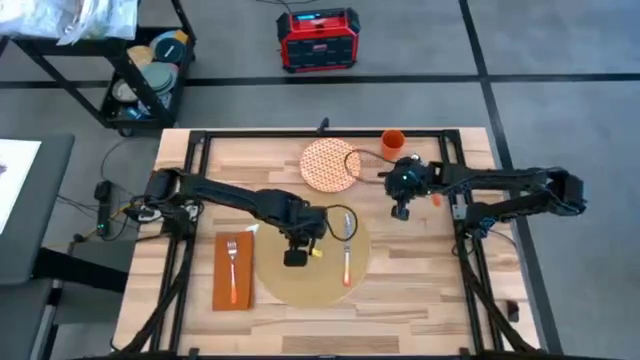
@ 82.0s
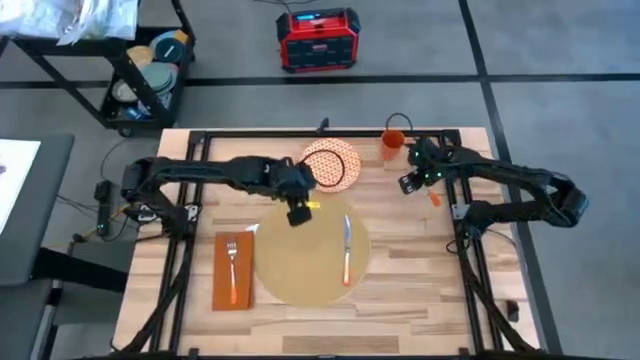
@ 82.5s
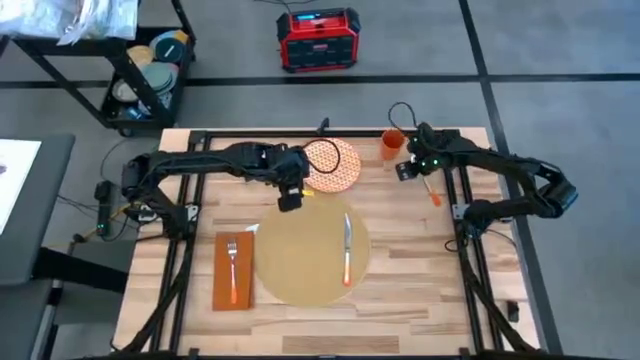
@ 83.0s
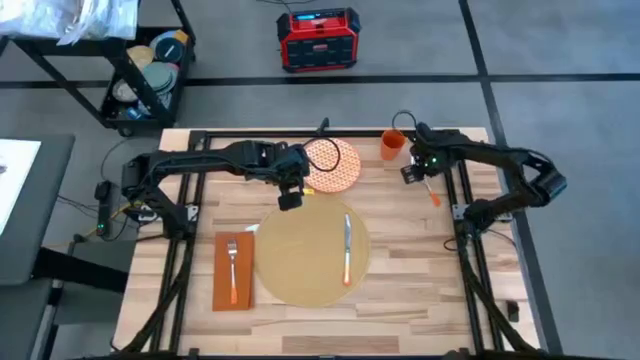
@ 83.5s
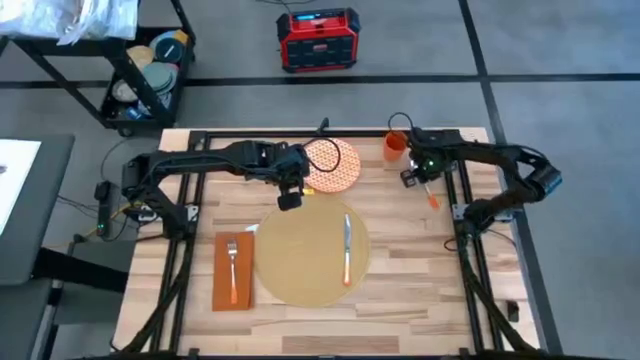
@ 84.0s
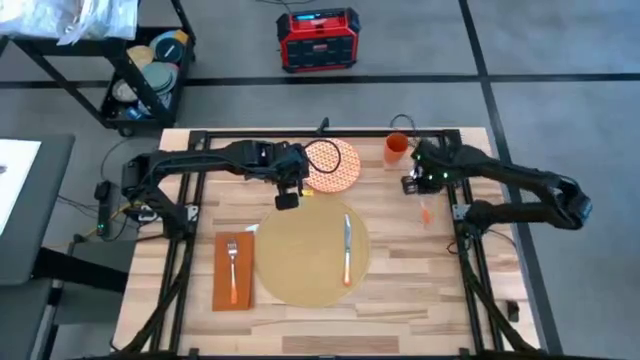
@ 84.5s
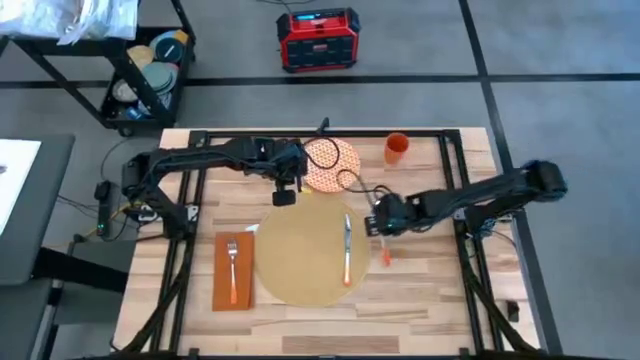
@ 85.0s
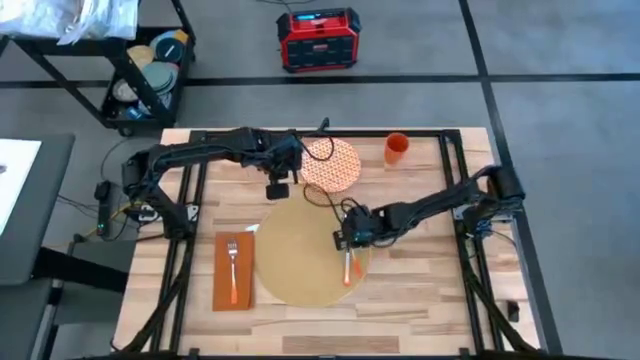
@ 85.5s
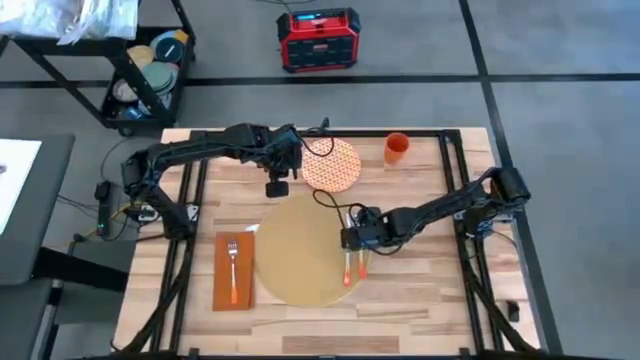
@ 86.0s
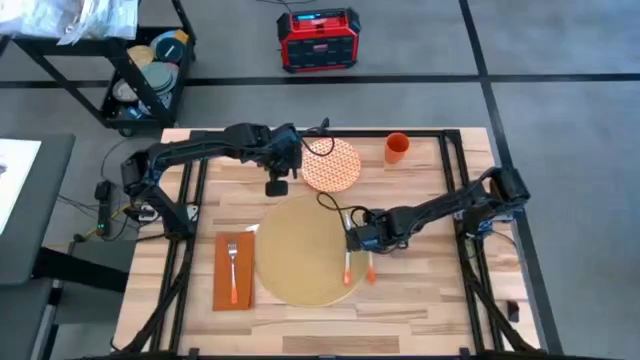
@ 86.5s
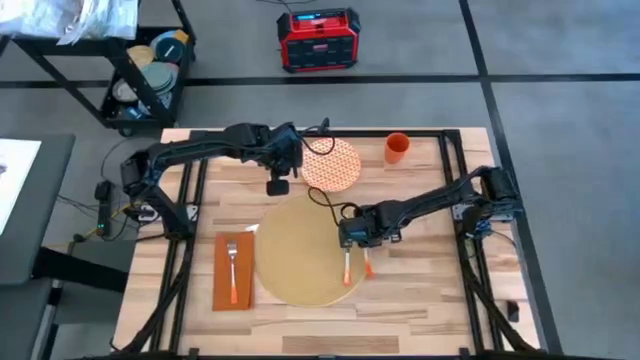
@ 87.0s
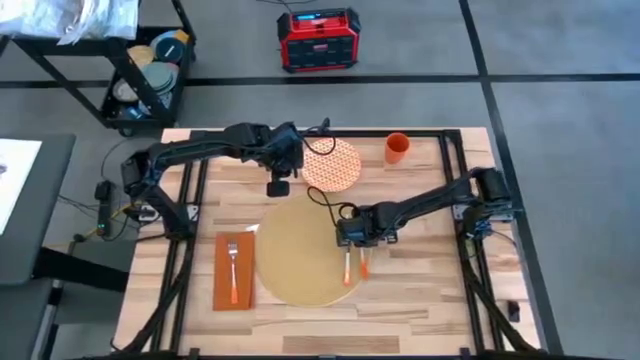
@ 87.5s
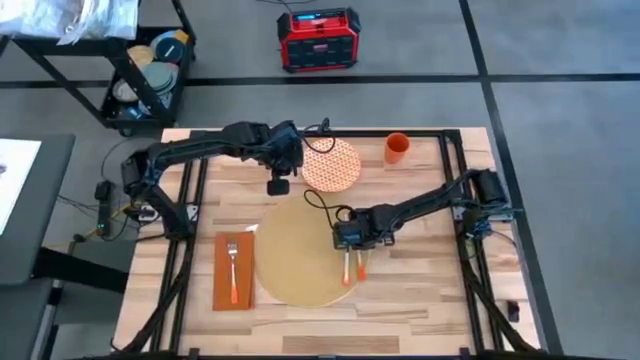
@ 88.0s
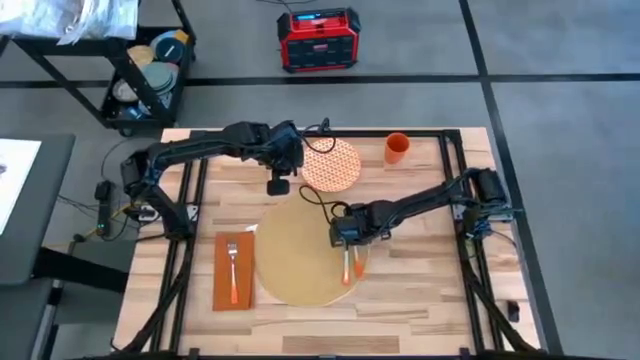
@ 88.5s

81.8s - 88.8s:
Task: Set table place
Put the orange table spoon on top of the brown placemat to the right of the orange table knife

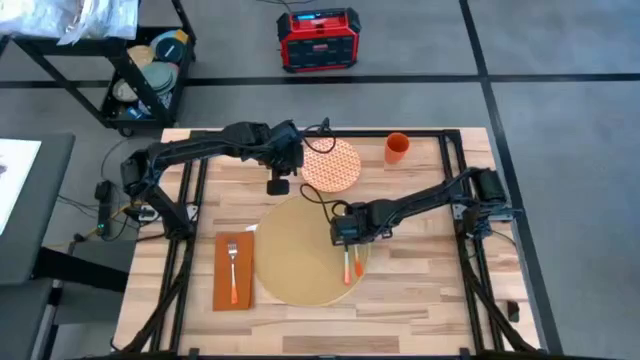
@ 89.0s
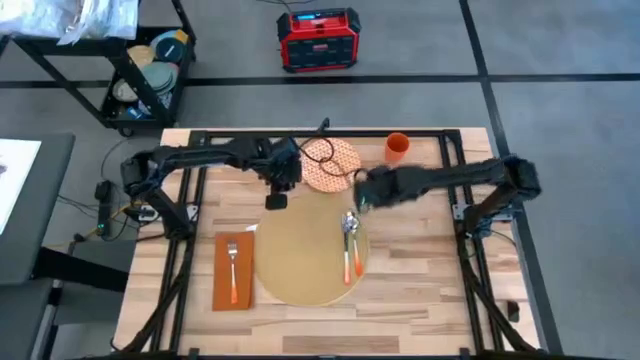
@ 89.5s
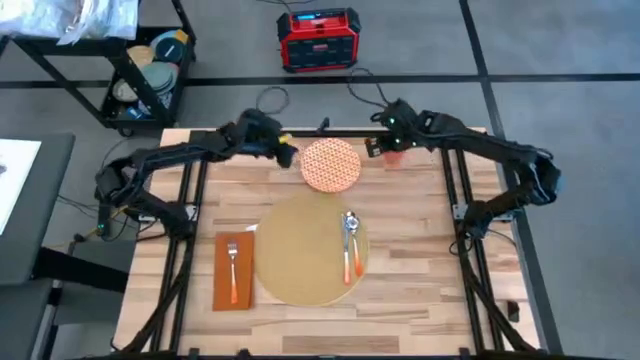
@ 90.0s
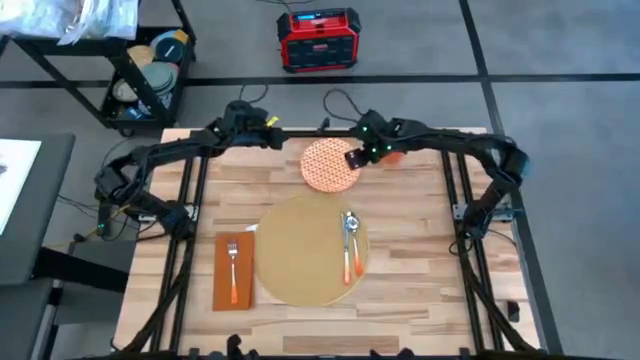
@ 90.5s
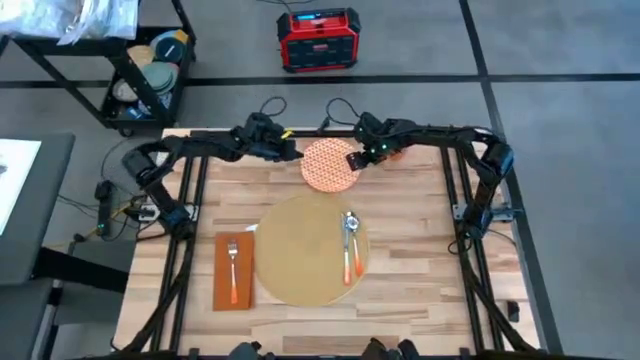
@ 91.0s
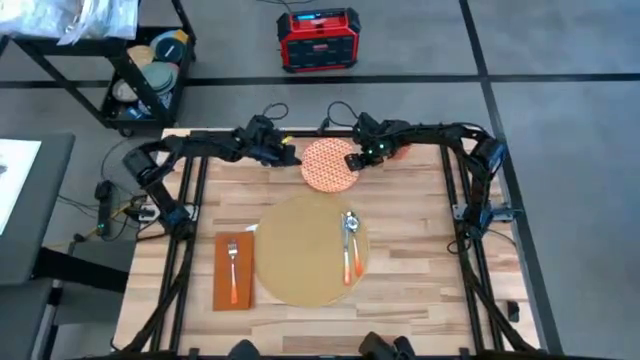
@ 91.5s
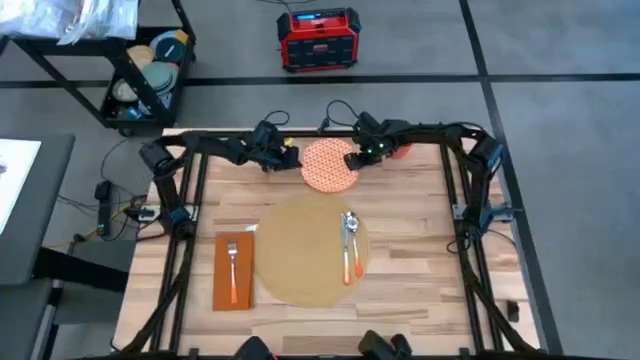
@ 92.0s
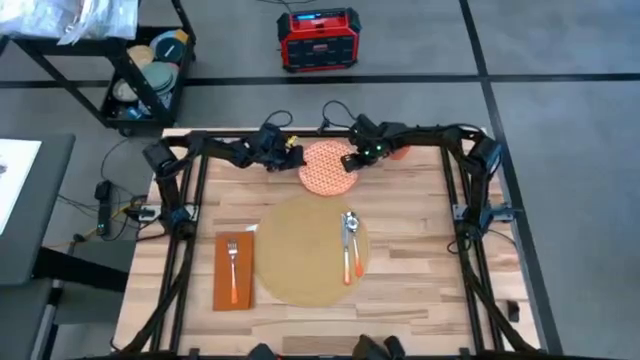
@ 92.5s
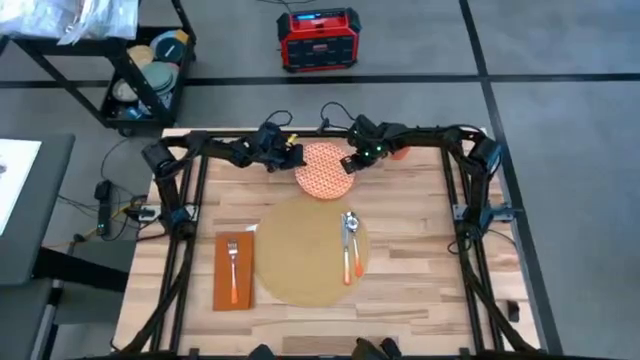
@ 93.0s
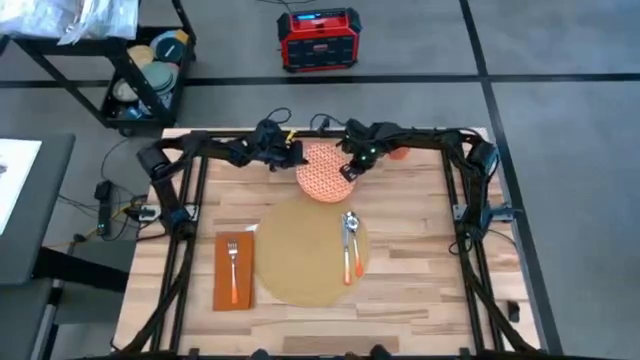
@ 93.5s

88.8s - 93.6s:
Put the orange plate on top of the brown placemat to the left of the orange table knife

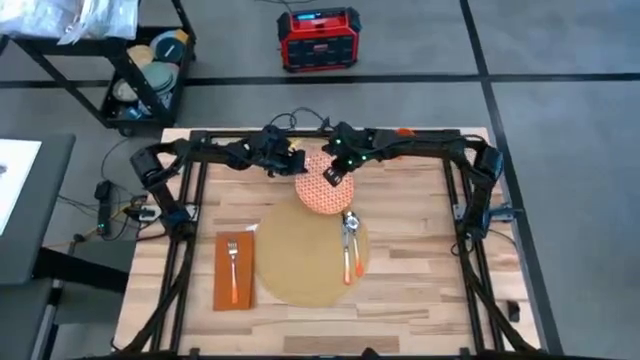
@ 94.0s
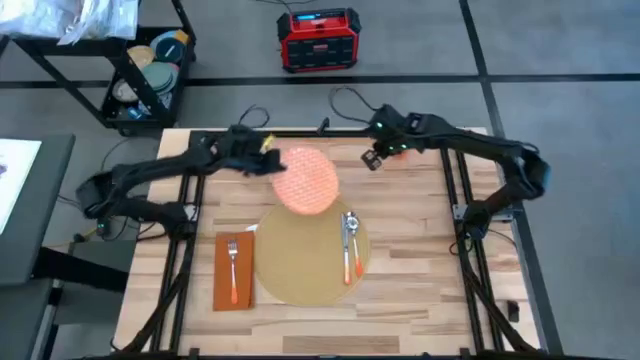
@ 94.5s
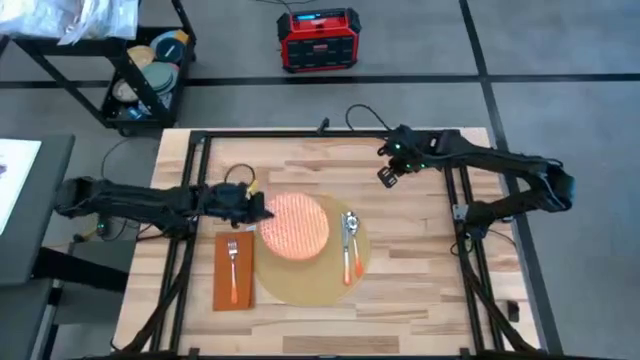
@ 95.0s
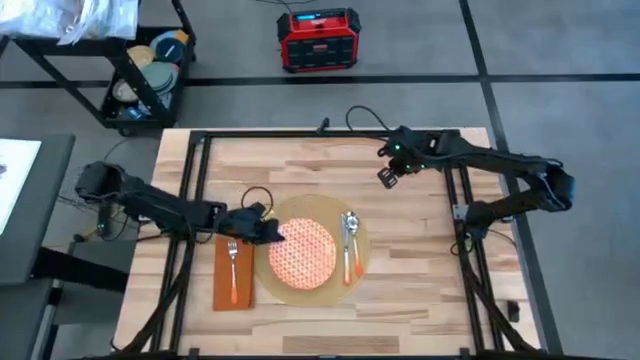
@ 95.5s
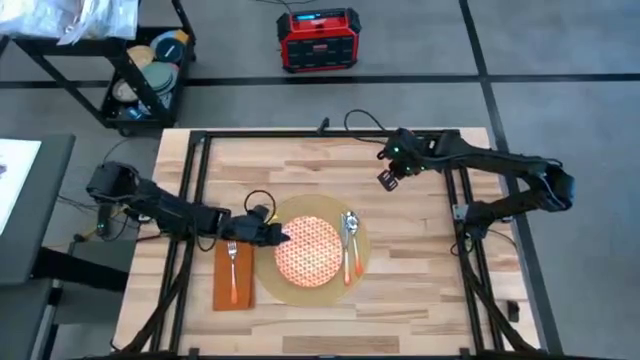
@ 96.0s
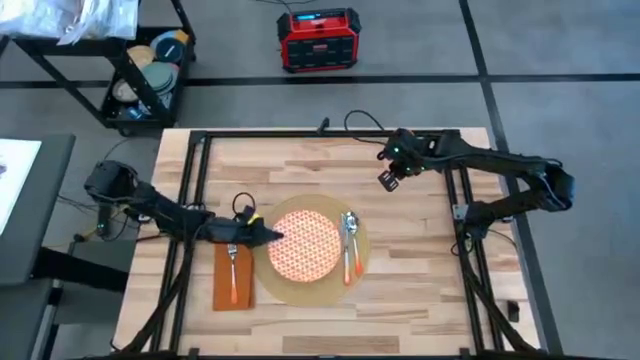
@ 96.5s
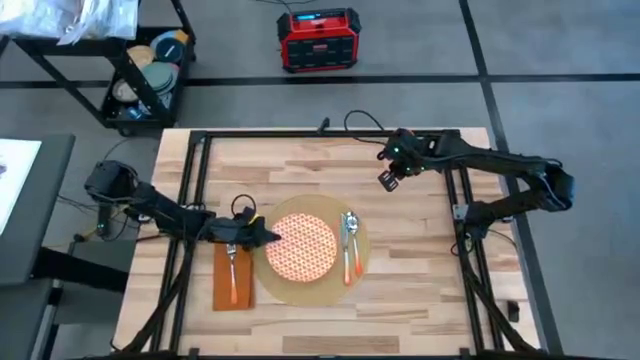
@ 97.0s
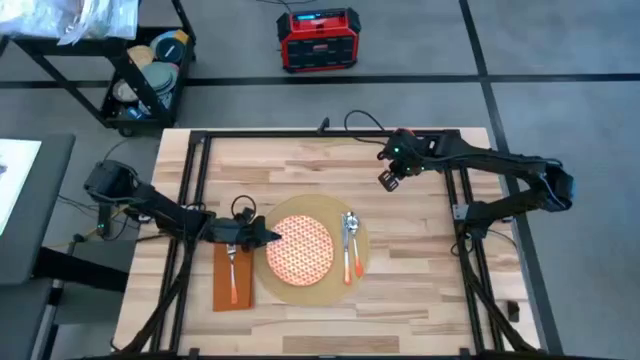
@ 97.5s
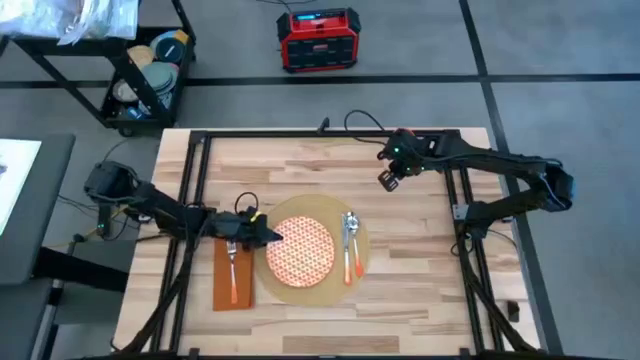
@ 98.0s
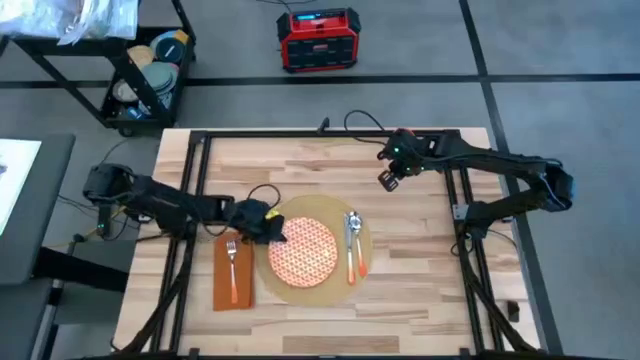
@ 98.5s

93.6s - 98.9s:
Put the orange plate on top of the brown placemat to the left of the orange table knife

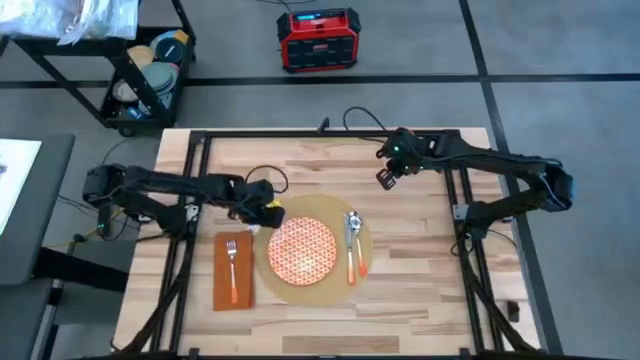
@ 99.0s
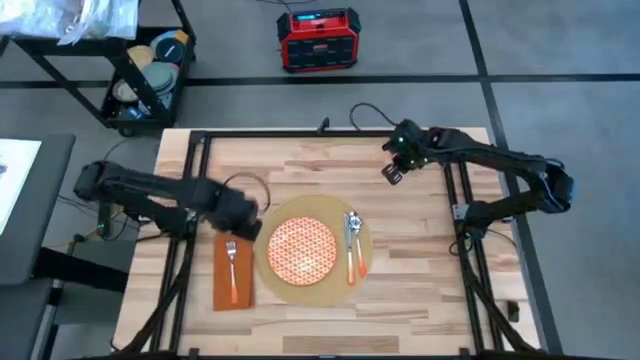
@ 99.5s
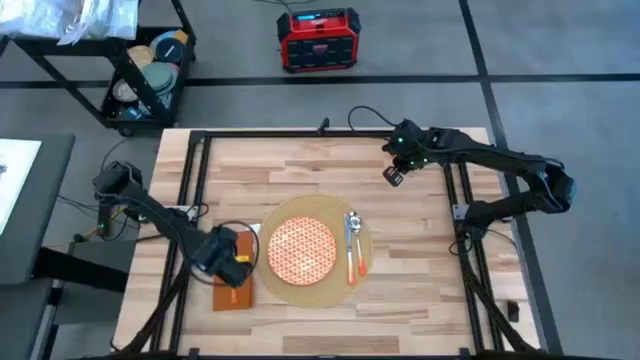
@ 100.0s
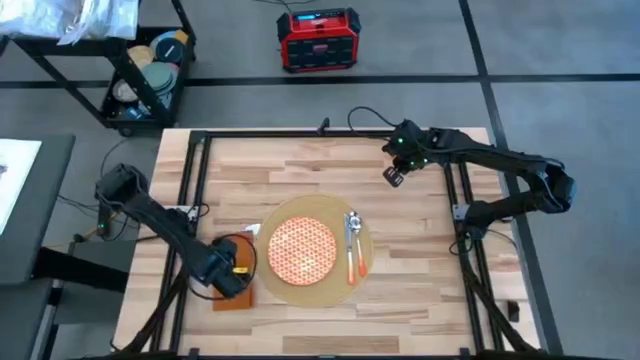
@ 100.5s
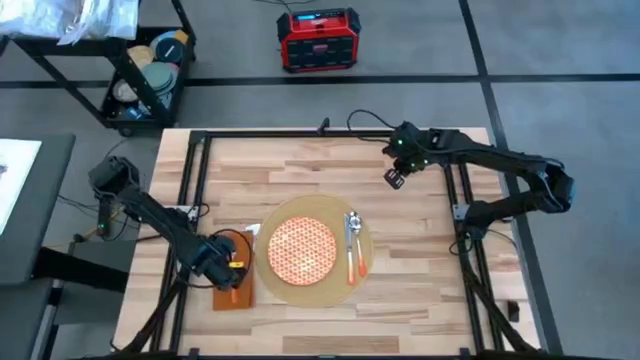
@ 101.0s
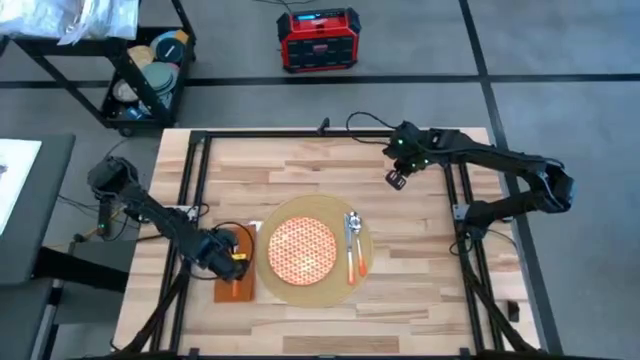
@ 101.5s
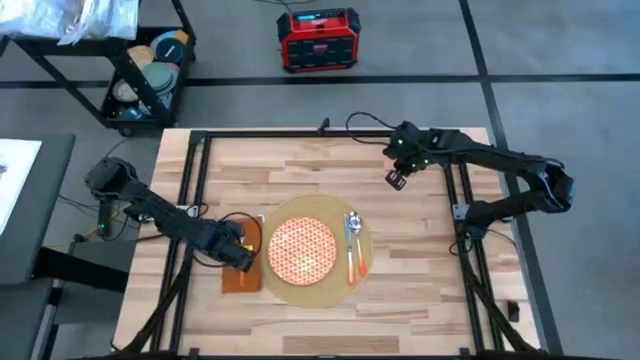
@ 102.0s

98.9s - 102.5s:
Adjust the orange table napkin

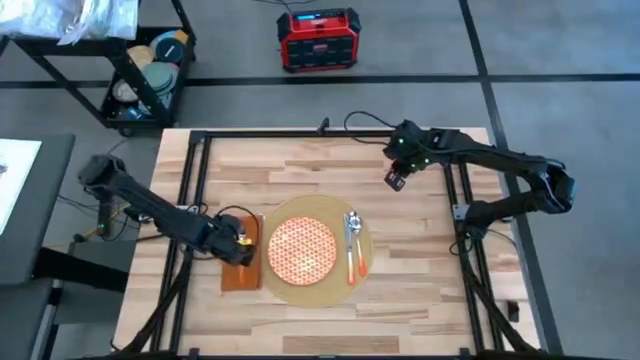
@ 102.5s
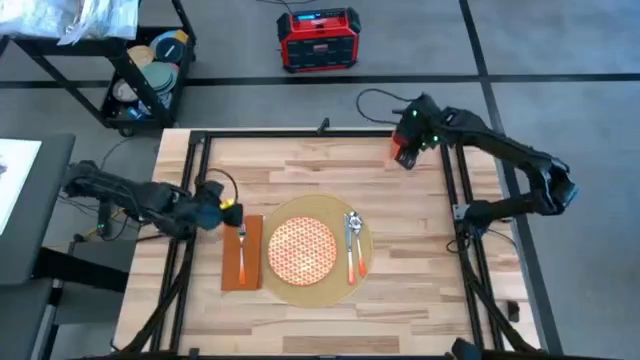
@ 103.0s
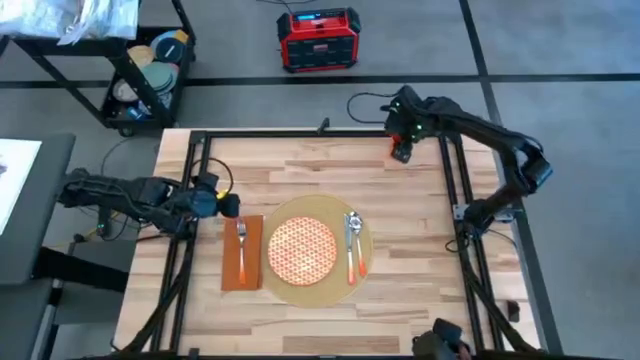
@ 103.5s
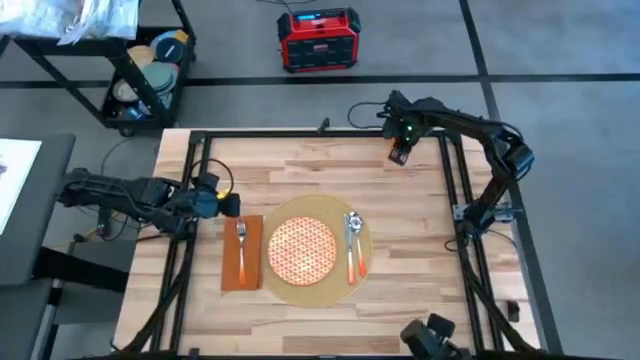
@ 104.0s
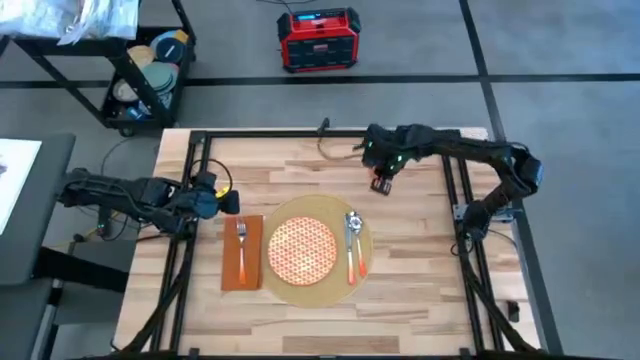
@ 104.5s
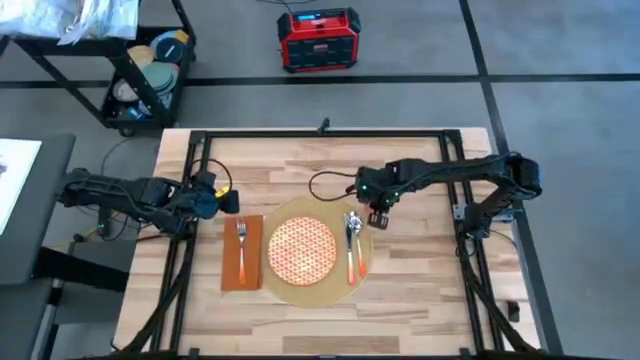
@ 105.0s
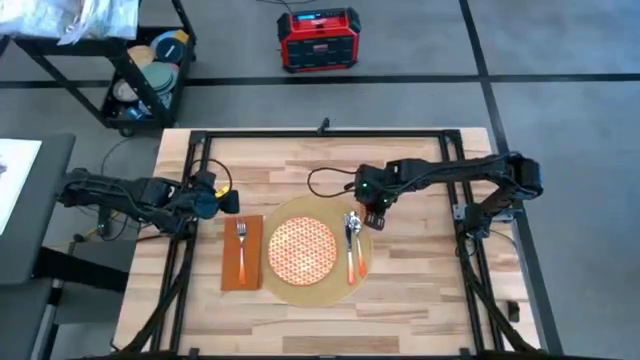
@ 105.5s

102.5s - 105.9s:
Put the orange cup to the top right of the brown placemat
